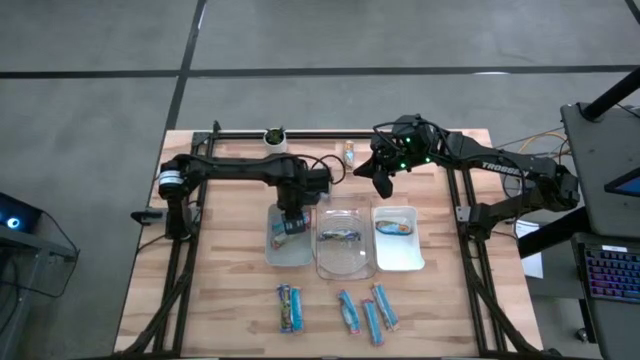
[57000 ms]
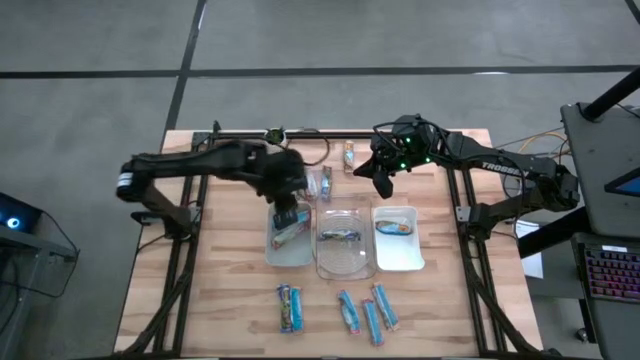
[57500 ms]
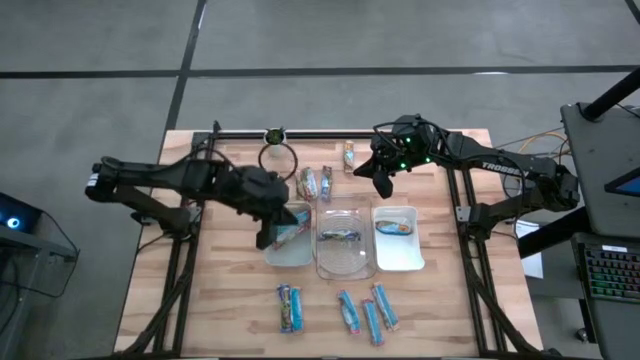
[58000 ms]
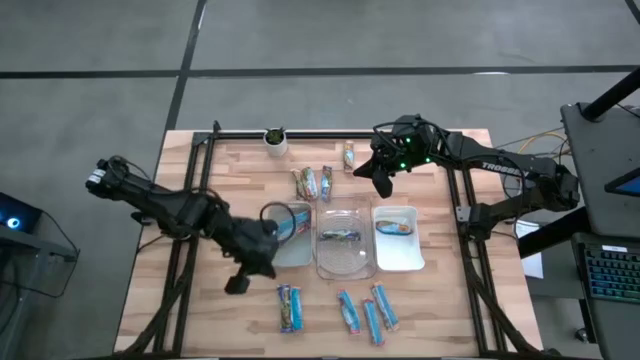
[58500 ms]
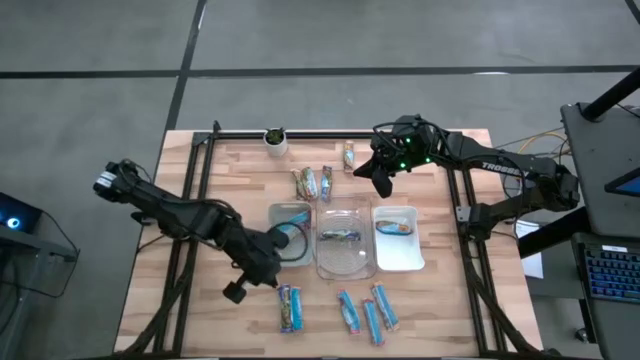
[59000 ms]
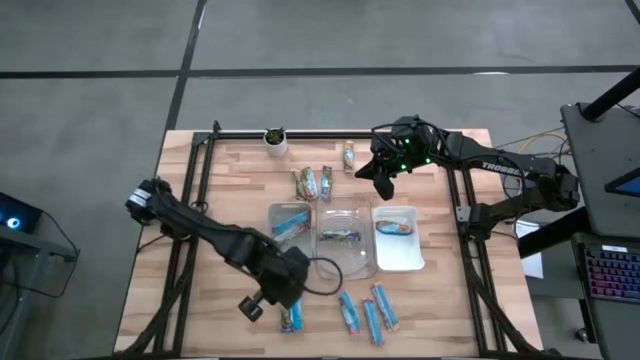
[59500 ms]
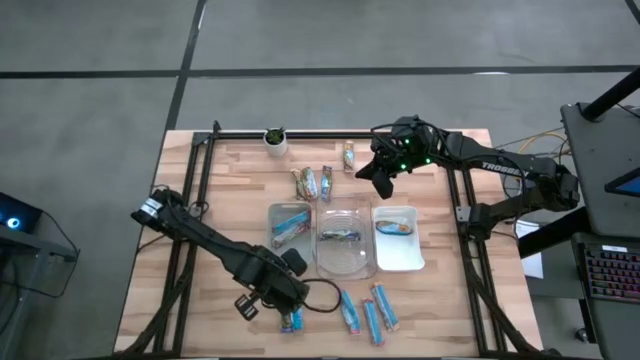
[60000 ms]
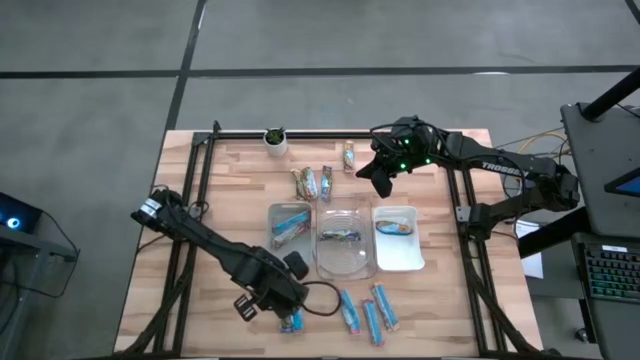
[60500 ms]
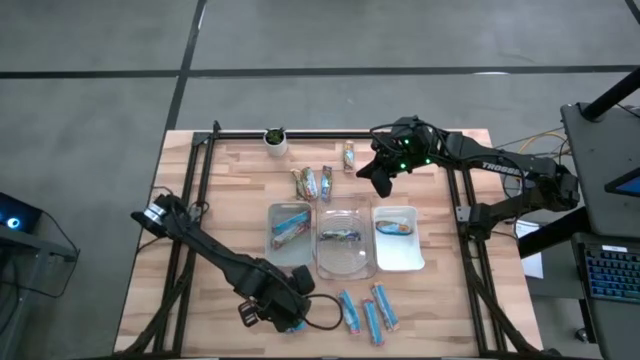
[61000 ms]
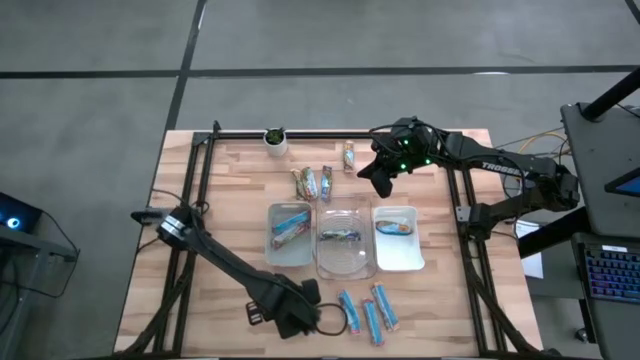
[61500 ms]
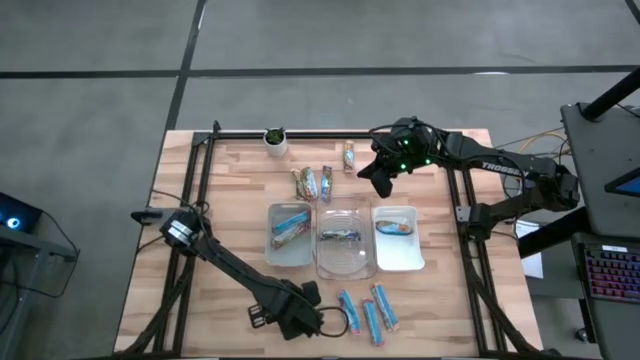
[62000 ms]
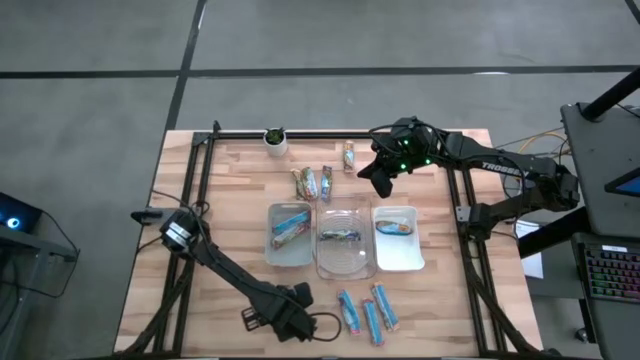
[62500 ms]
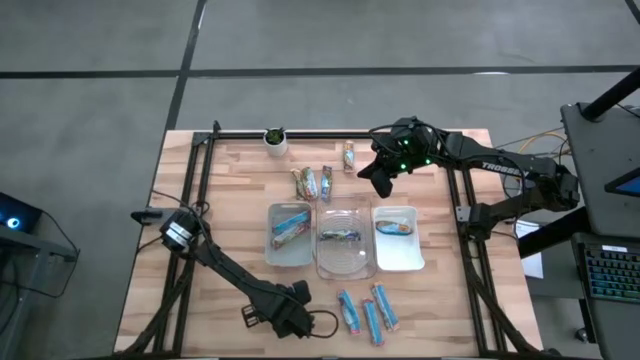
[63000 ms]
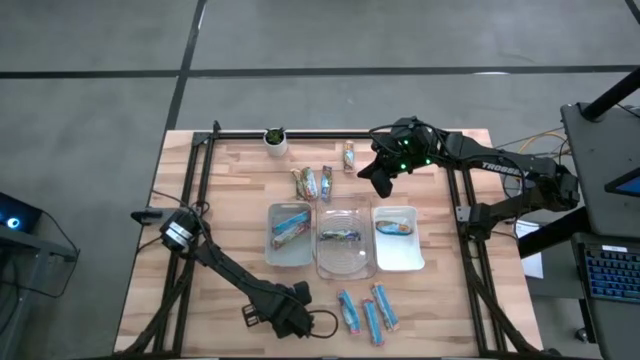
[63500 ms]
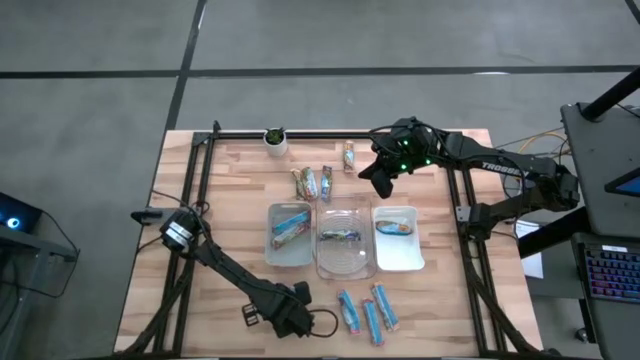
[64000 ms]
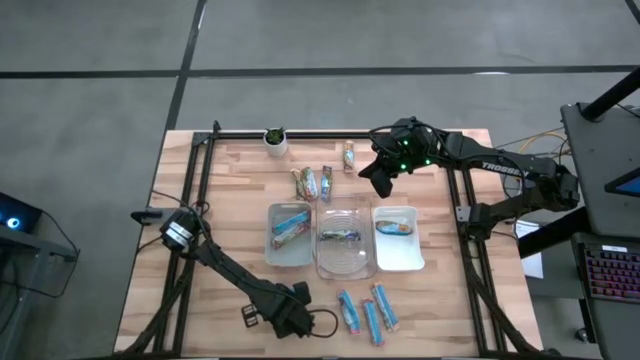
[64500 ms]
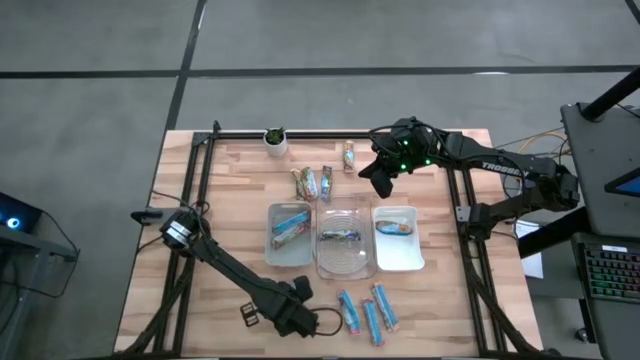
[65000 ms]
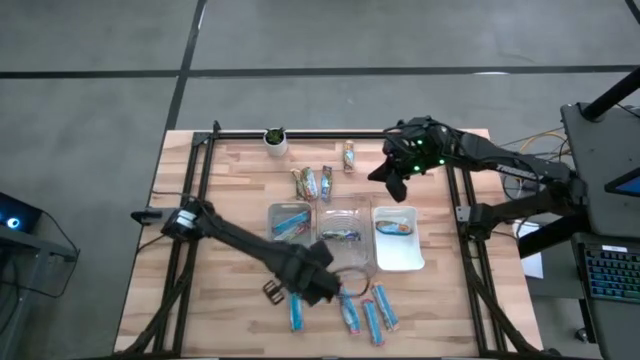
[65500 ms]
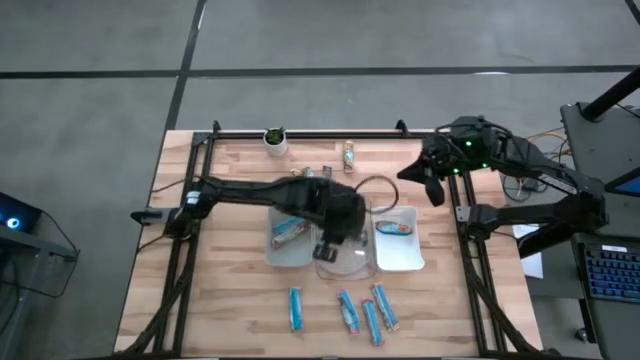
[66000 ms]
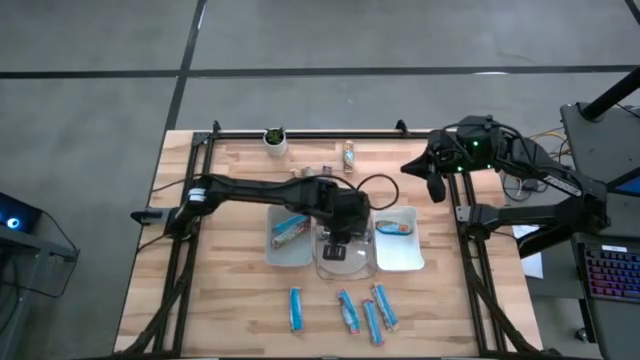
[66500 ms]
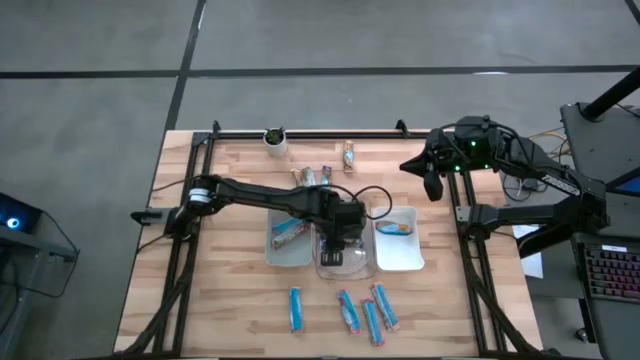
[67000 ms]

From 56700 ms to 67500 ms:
Task: Pick and place Granola Bars by type
Put the left blue granola bar into the transparent bin

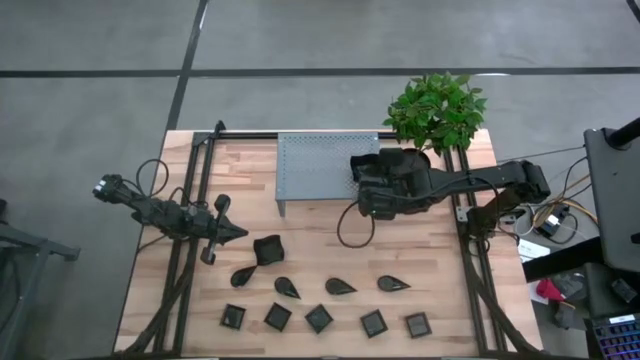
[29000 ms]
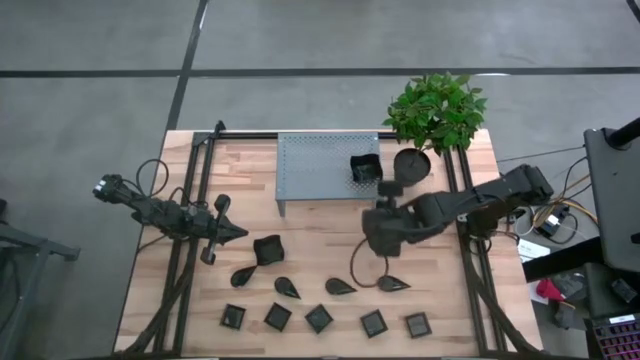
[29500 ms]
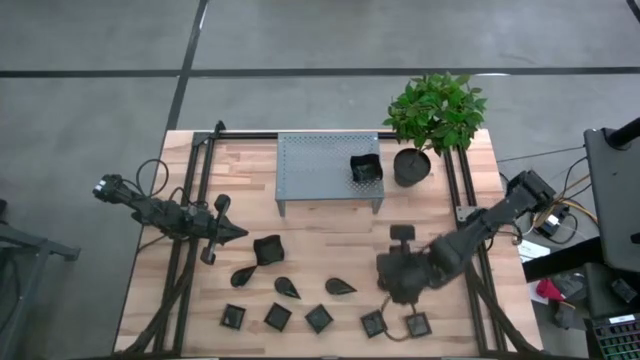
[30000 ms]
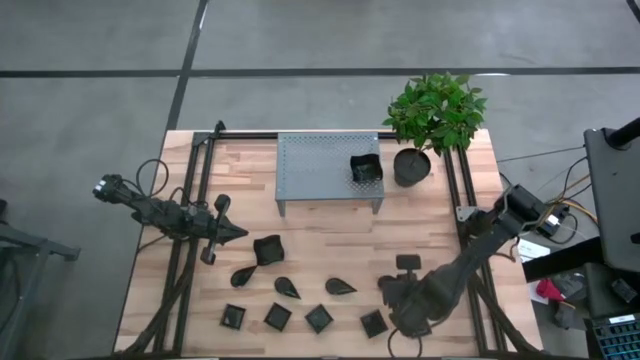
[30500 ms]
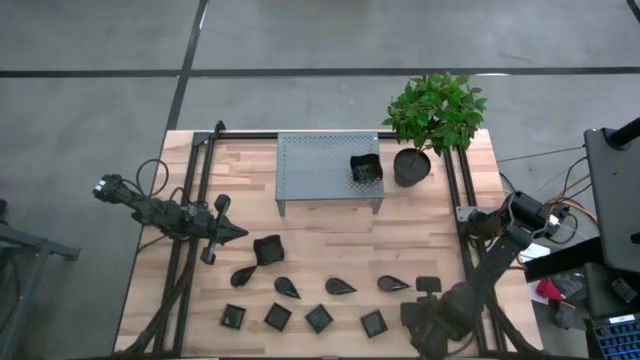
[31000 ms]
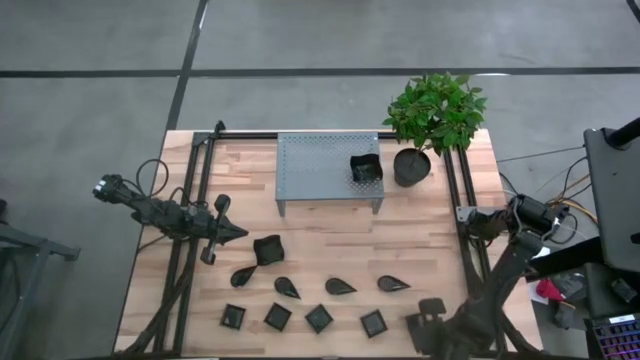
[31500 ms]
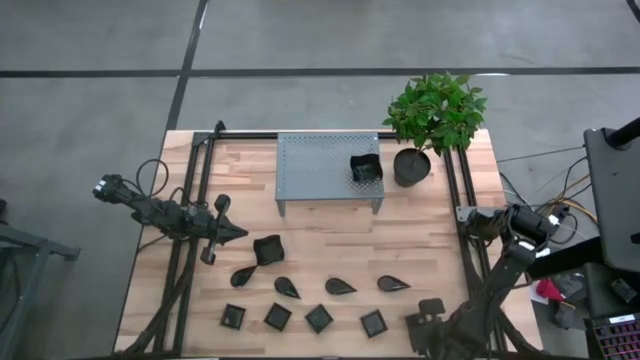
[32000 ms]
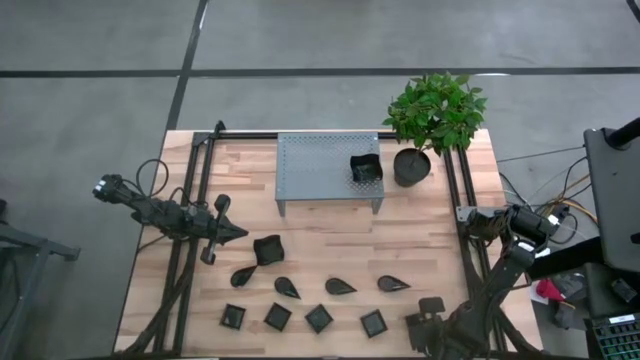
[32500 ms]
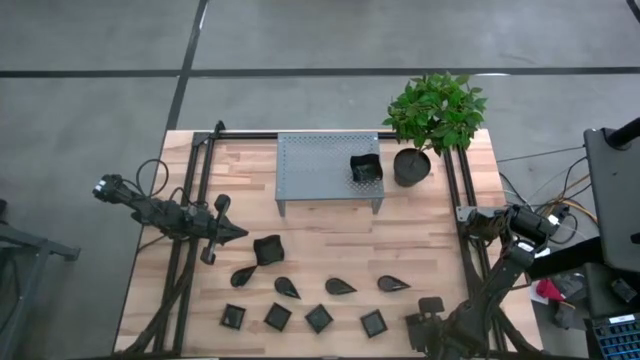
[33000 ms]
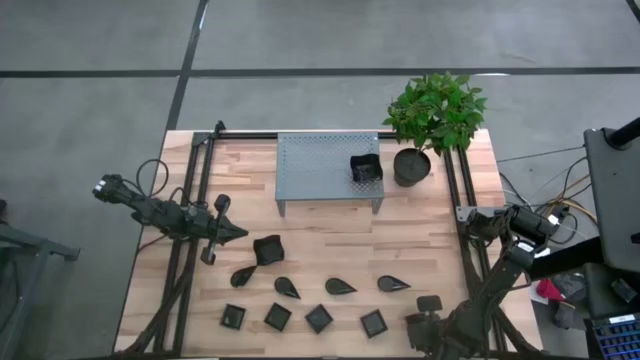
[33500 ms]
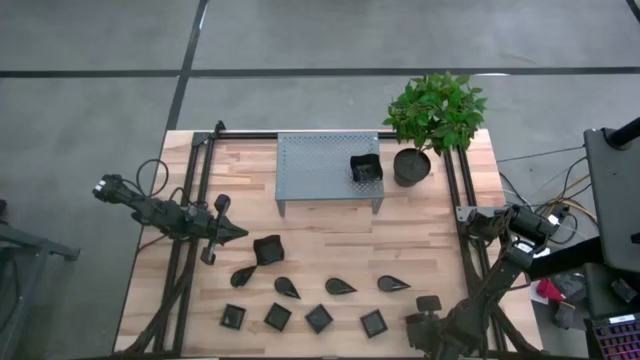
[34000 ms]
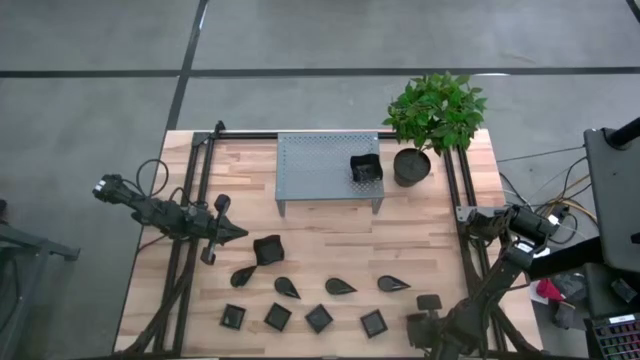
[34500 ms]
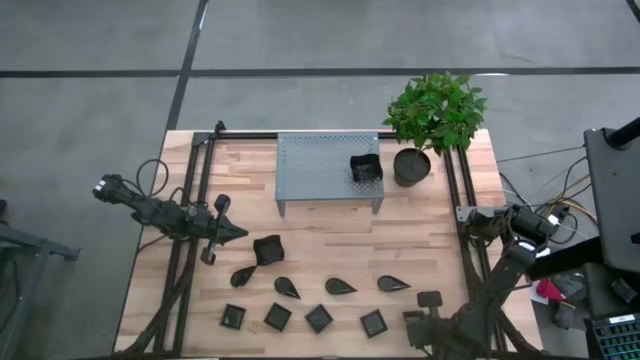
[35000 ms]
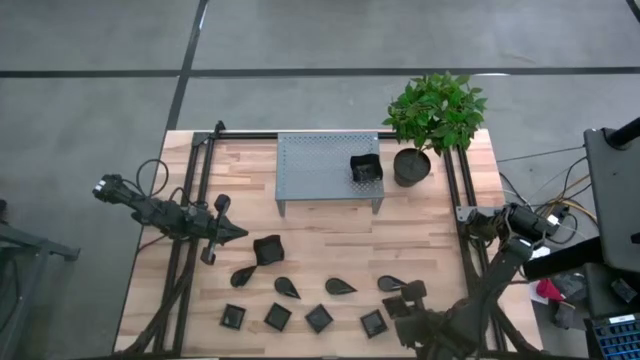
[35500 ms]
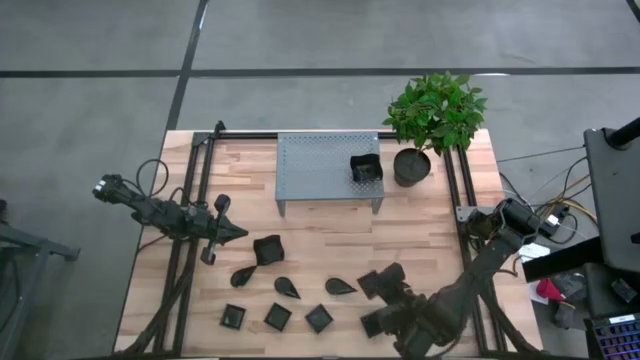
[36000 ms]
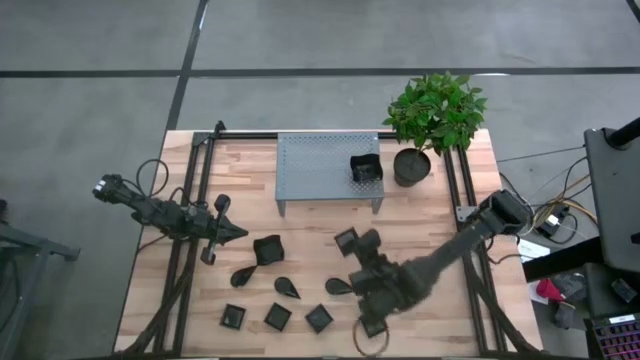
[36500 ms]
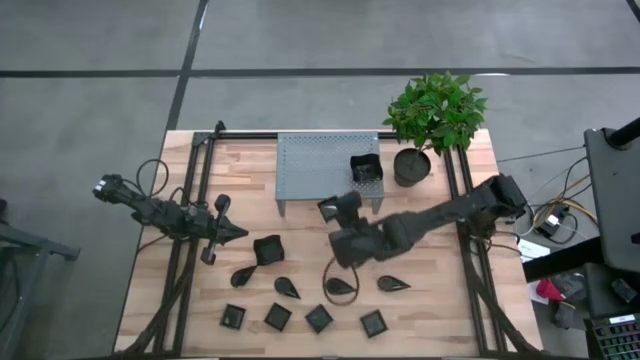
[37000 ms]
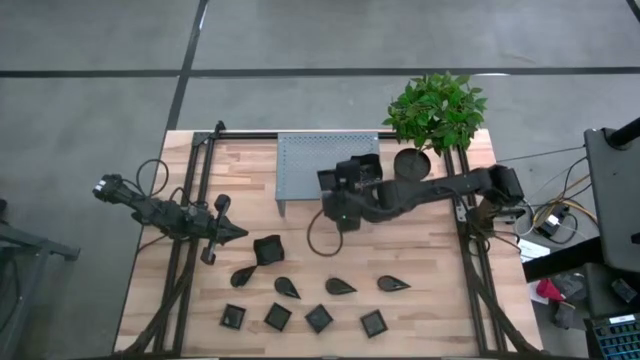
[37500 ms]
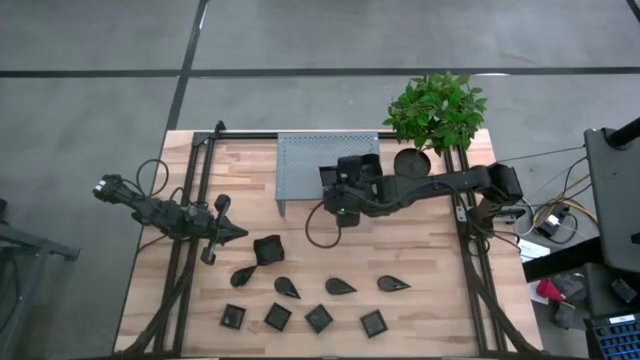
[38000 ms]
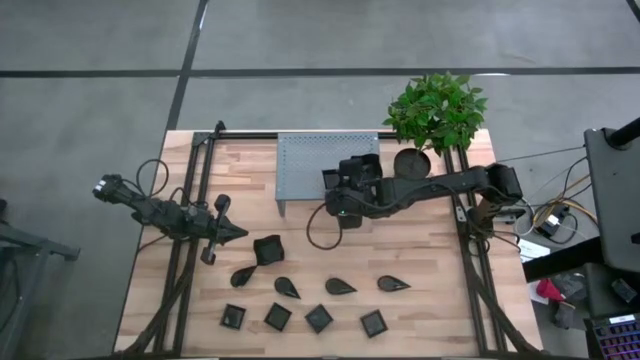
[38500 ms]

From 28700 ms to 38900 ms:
Task: Pick & Place Mini shaped plates
Put the black square plate on the shelf
